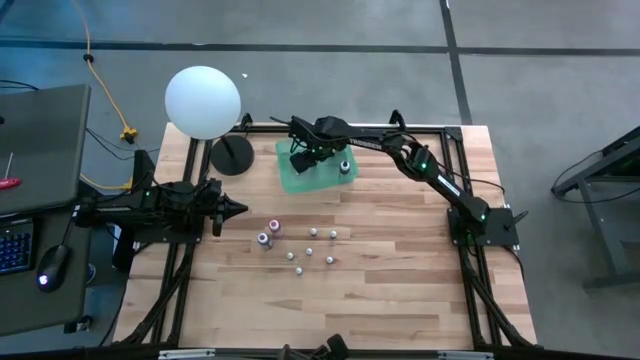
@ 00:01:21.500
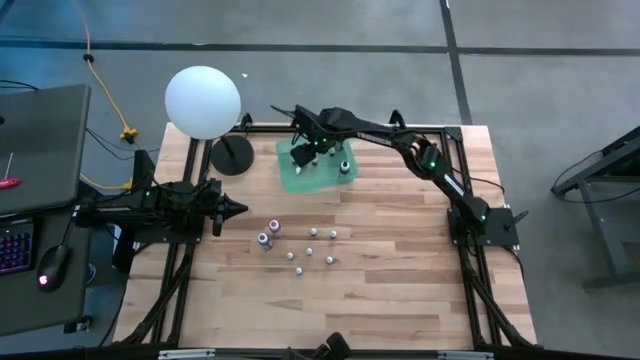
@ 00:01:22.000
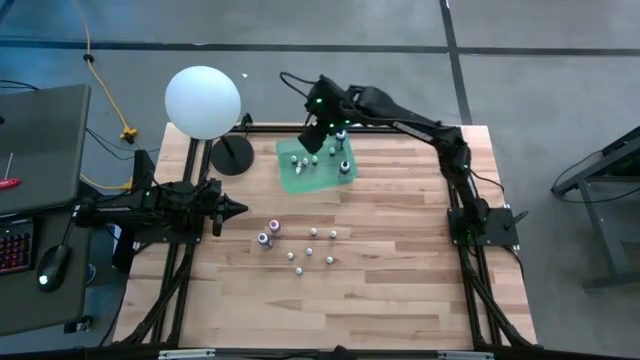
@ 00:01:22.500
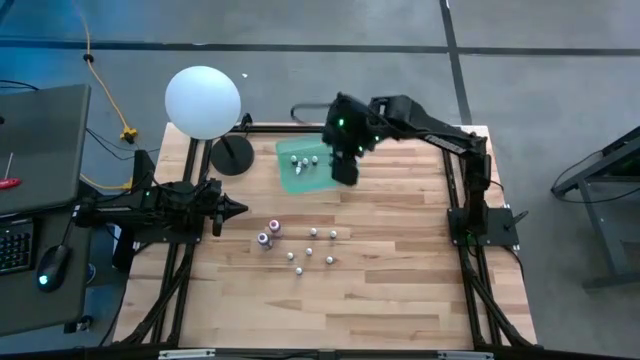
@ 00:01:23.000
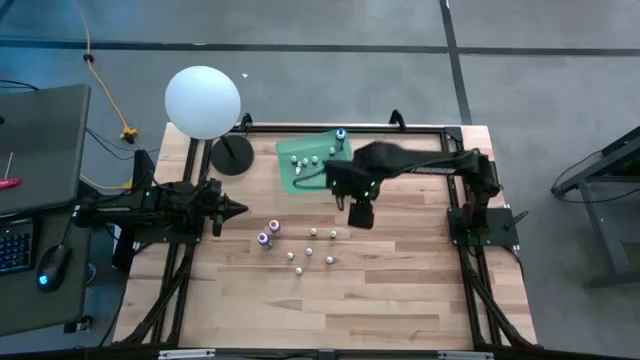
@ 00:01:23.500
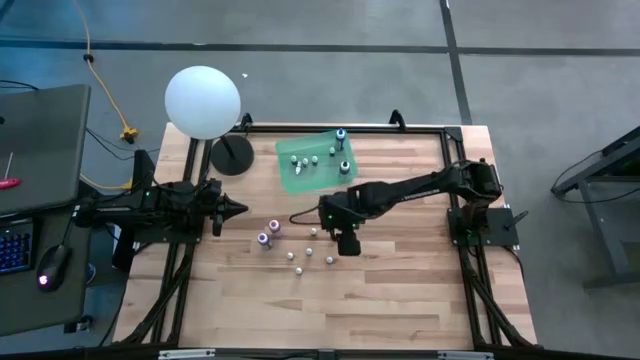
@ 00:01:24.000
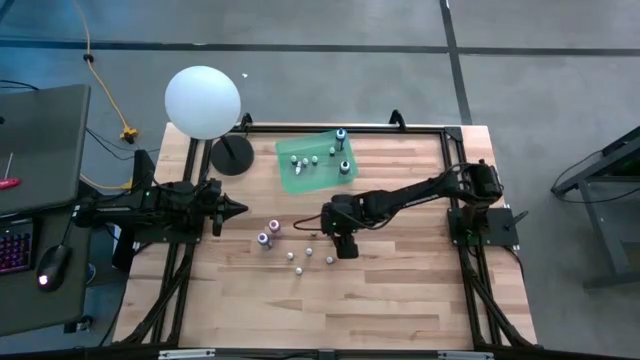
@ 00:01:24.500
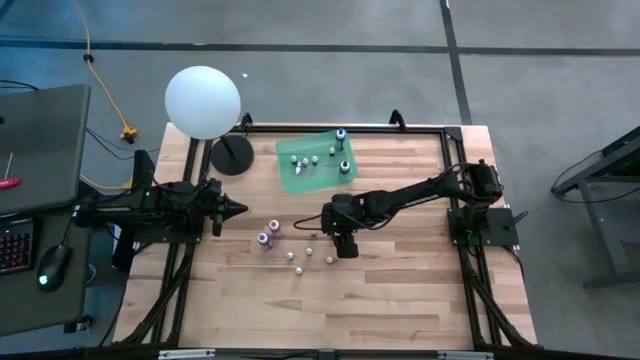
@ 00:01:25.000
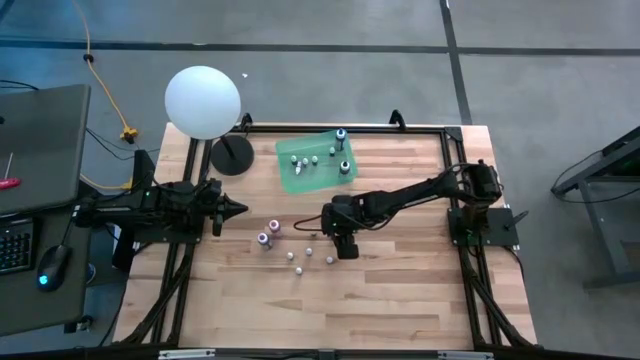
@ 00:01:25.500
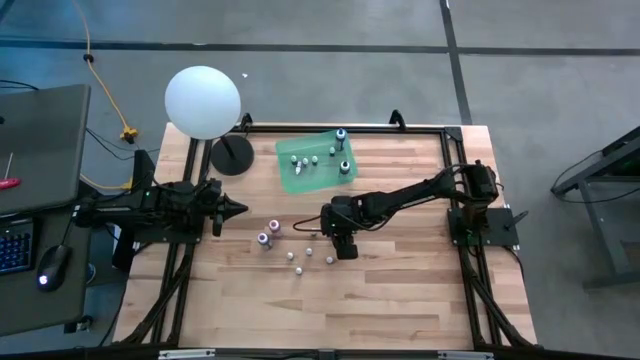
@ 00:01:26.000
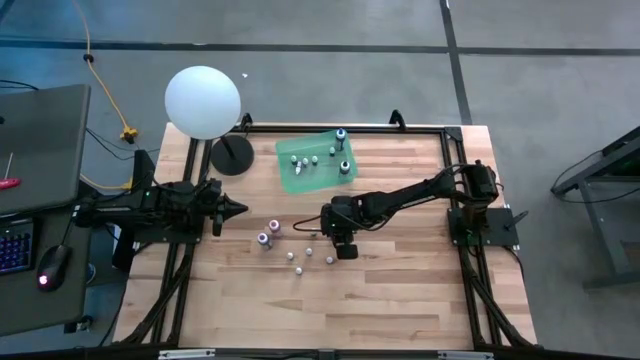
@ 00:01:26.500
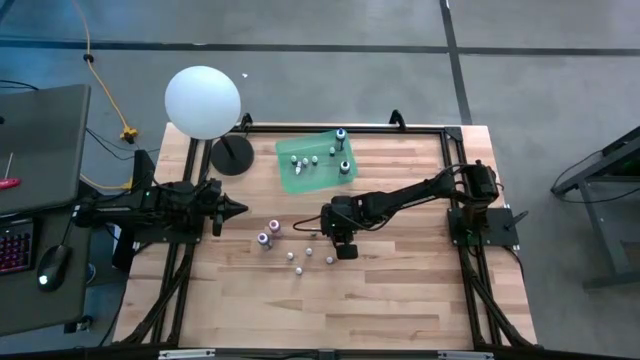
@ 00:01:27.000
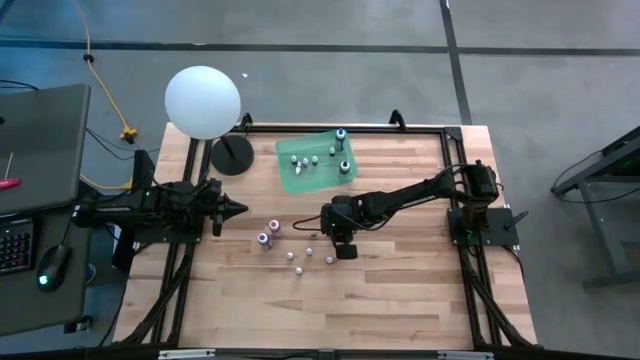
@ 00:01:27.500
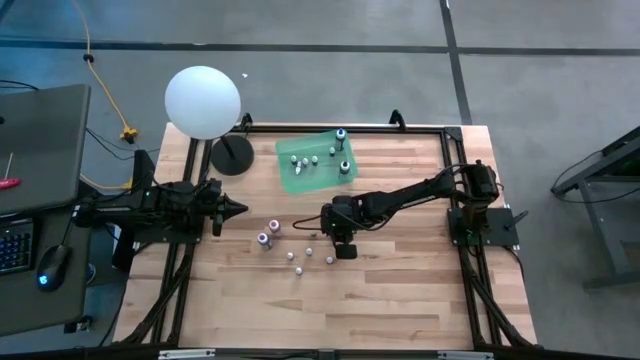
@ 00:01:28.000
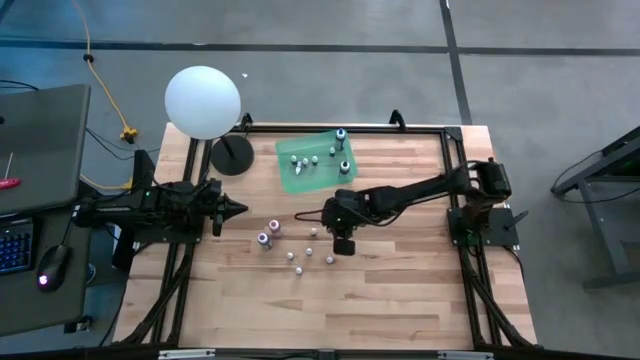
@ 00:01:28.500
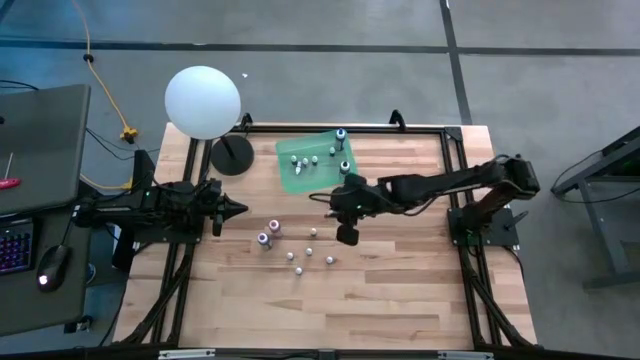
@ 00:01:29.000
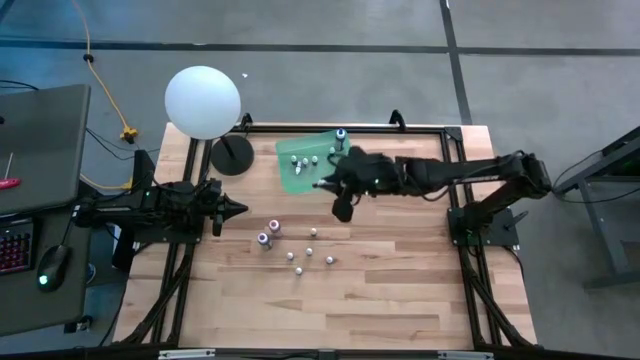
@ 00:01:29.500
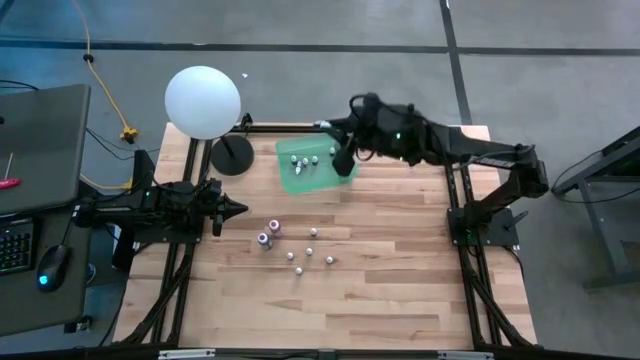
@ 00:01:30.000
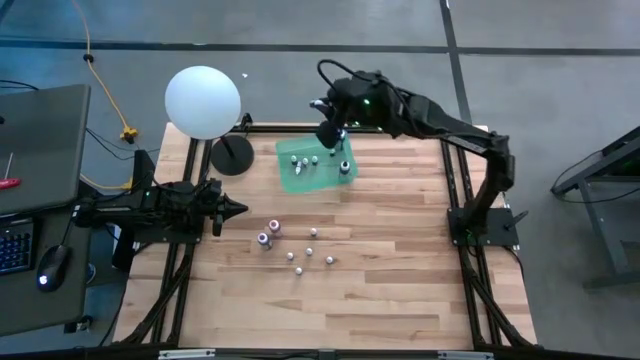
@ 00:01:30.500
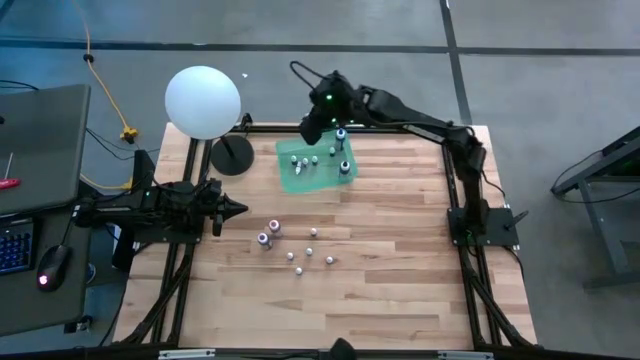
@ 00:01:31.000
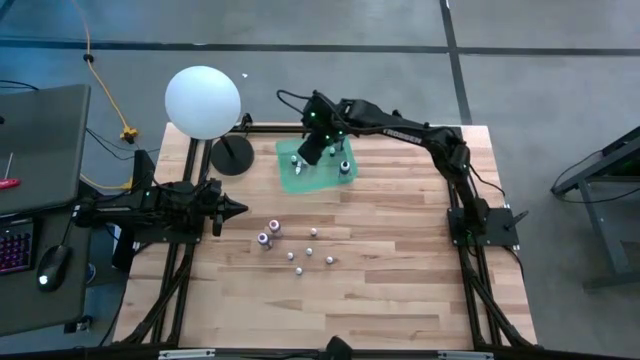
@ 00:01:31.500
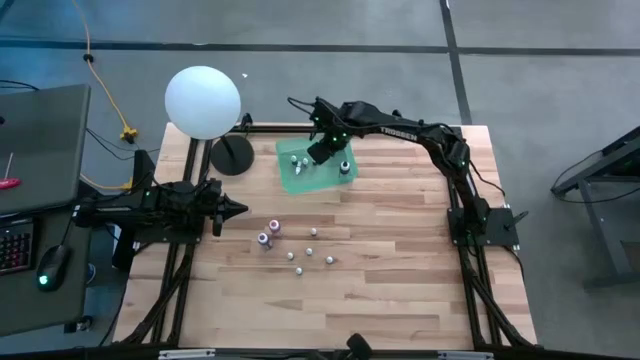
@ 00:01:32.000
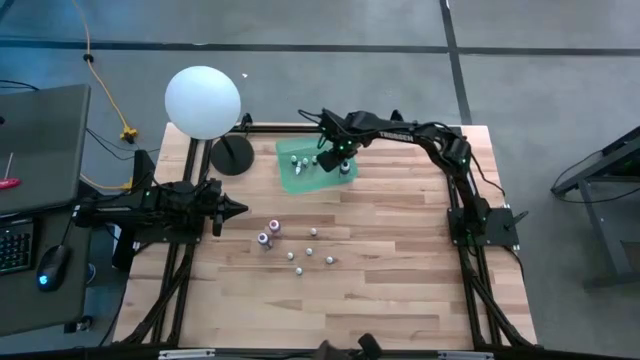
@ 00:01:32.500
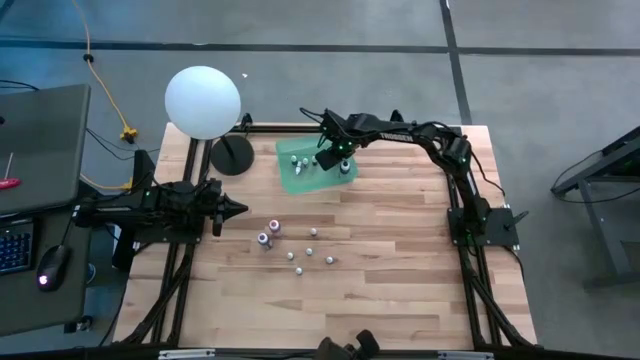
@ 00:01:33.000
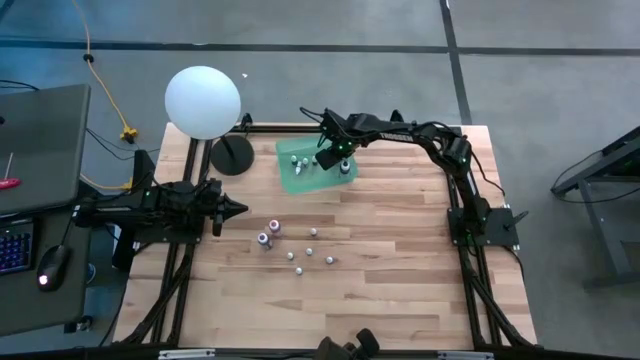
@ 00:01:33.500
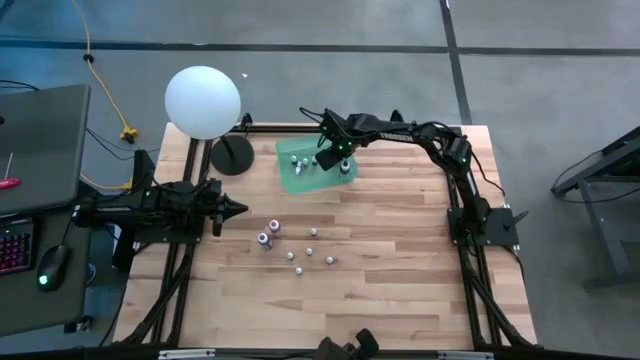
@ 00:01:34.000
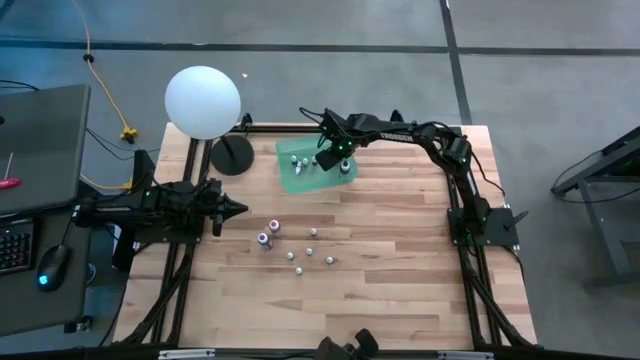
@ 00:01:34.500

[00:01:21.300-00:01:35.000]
Task: Pick & Place food coloring
Put the small purple dye bottle in the green bin

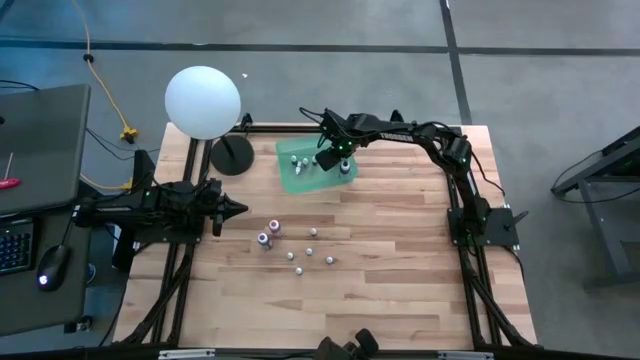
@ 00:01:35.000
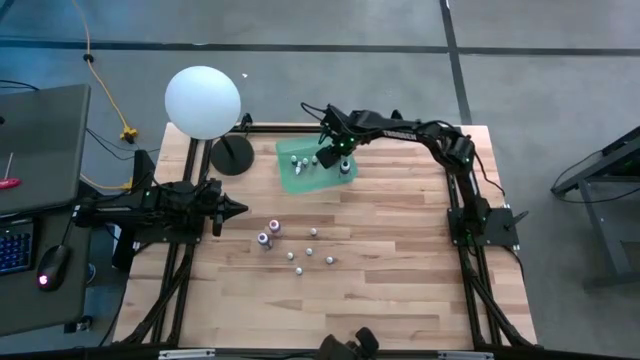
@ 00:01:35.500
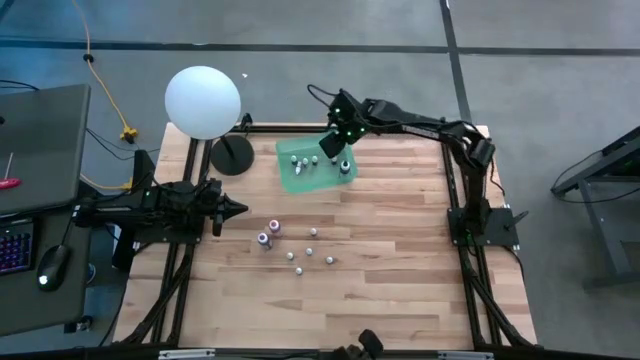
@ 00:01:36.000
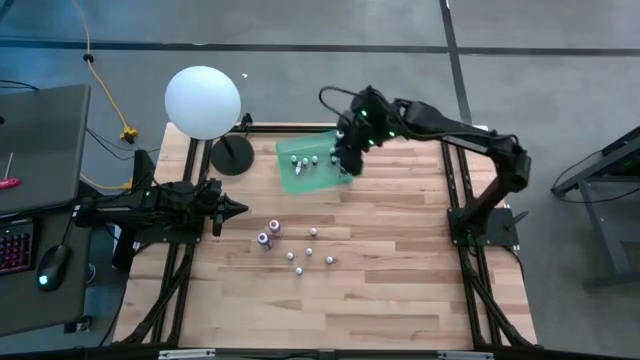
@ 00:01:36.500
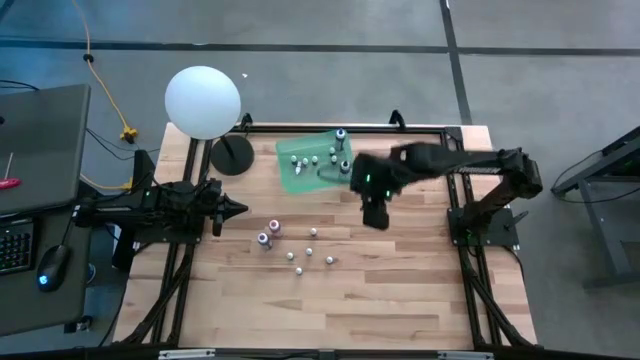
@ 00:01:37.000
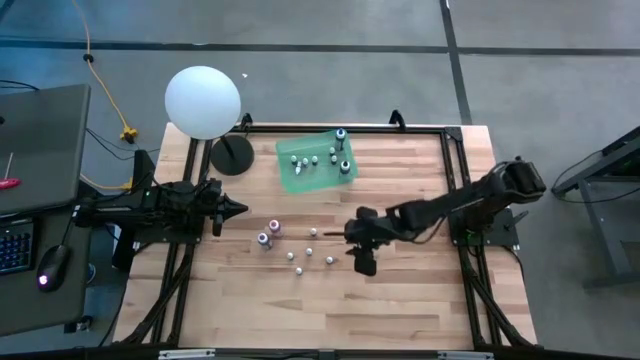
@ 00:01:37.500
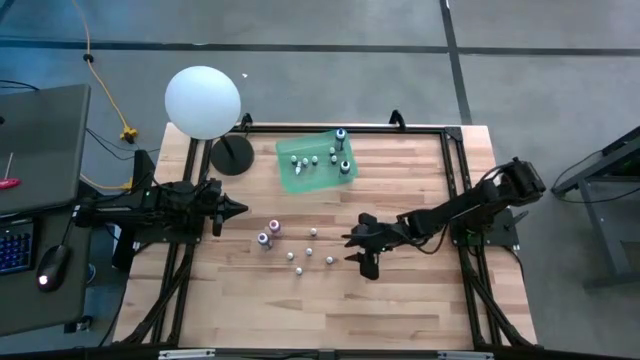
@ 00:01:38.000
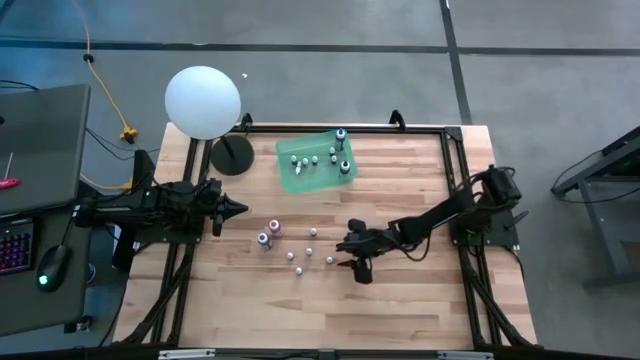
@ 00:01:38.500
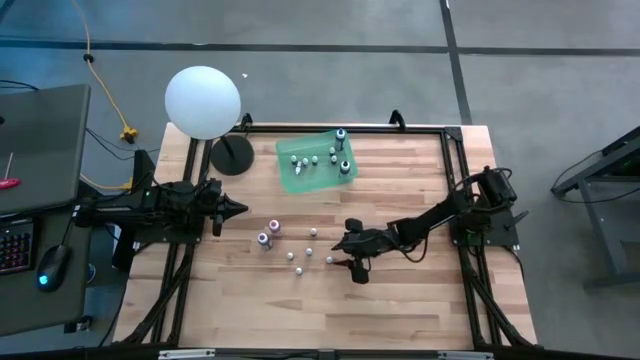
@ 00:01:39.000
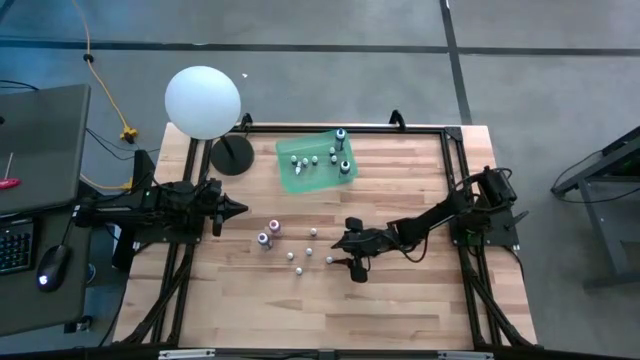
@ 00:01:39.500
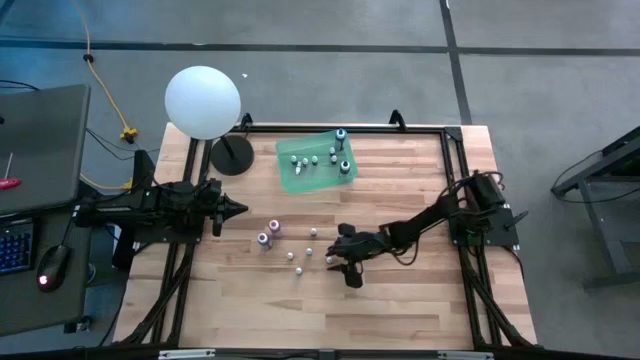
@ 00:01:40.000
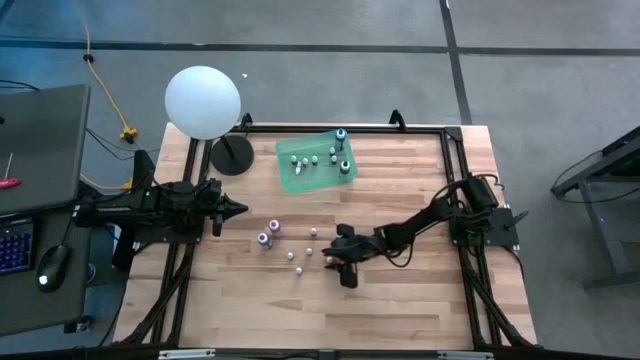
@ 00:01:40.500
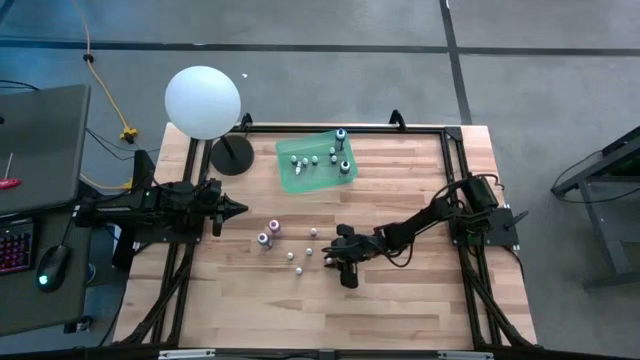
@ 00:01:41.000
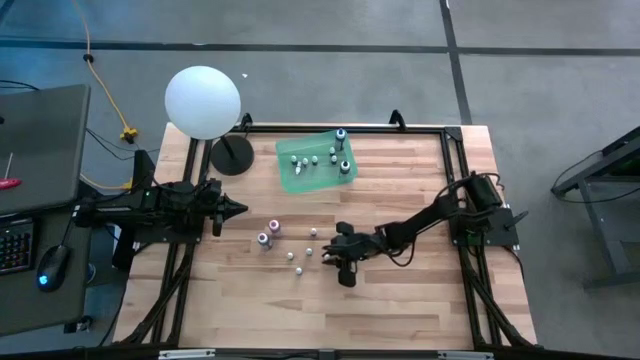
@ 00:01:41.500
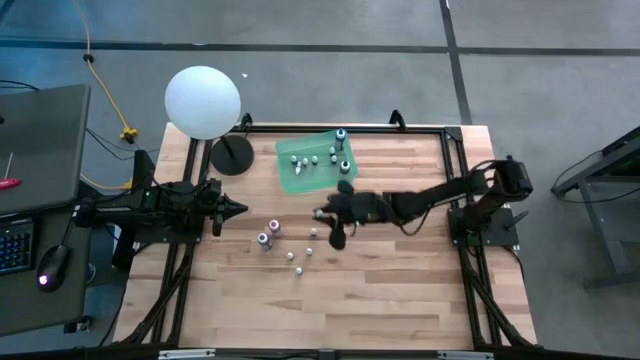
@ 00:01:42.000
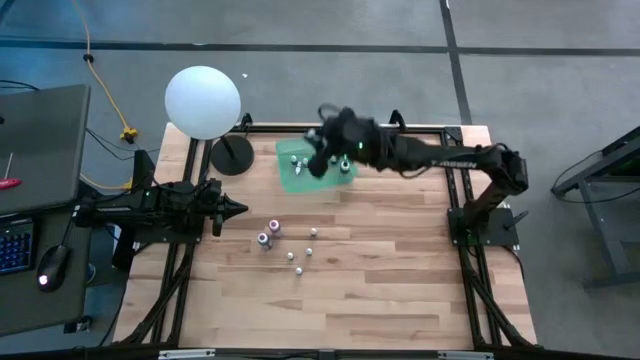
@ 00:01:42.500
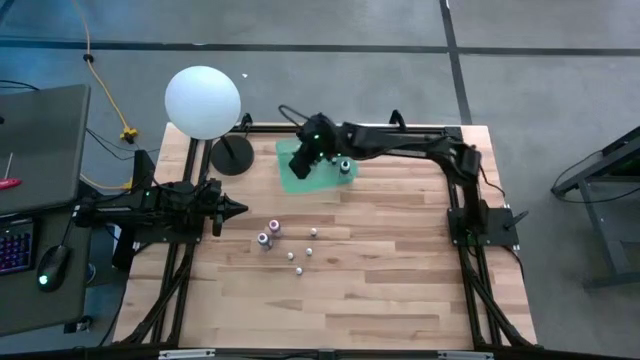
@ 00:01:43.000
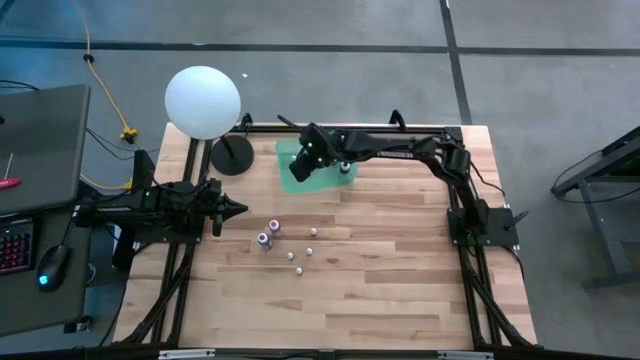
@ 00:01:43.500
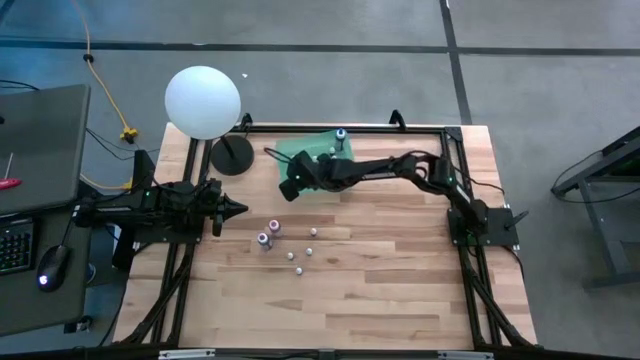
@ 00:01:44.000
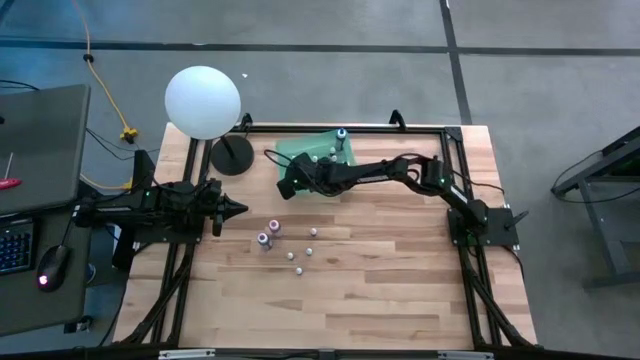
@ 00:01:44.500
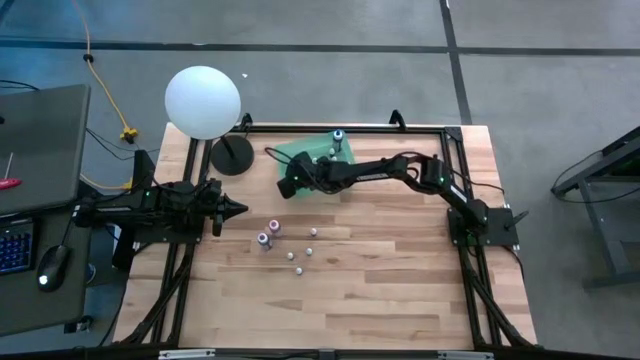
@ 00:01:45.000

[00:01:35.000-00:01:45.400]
Put the small black dye bottle in the green bin
